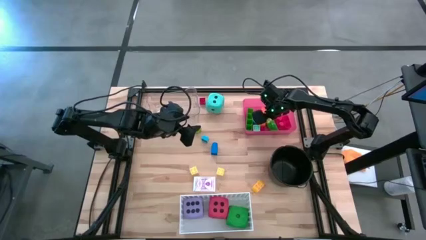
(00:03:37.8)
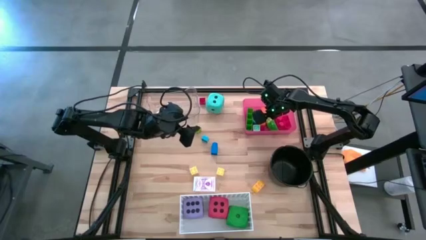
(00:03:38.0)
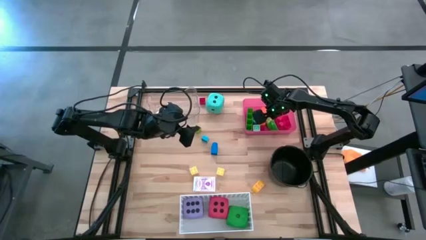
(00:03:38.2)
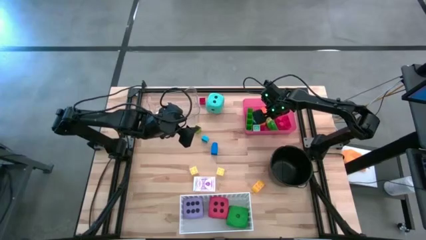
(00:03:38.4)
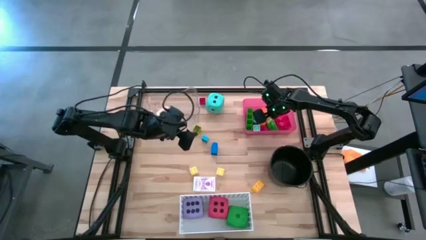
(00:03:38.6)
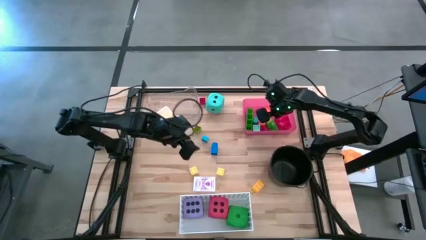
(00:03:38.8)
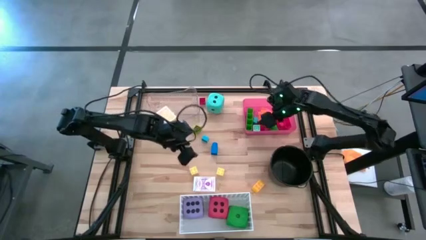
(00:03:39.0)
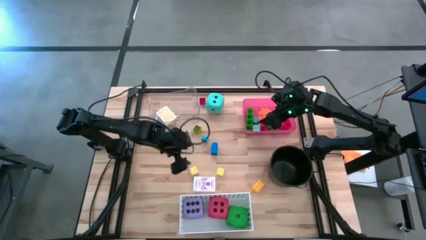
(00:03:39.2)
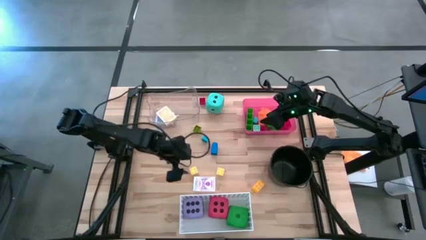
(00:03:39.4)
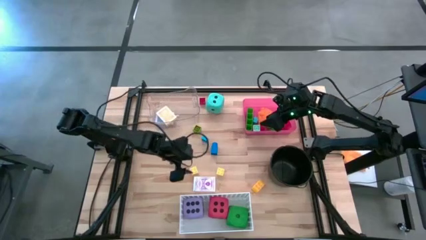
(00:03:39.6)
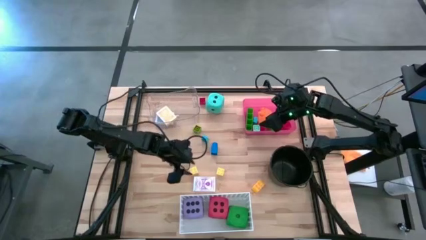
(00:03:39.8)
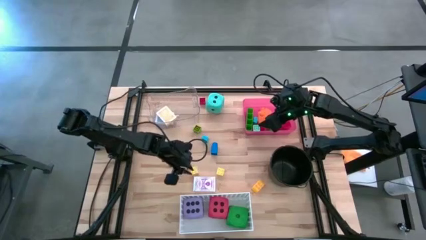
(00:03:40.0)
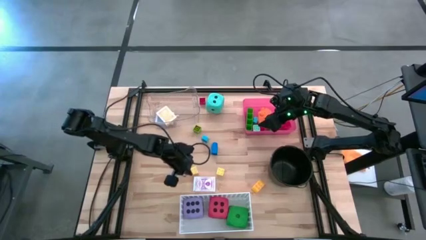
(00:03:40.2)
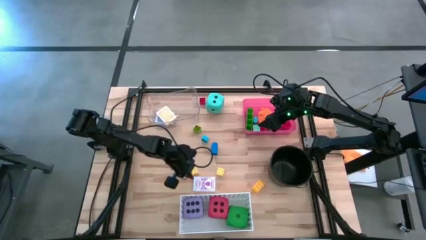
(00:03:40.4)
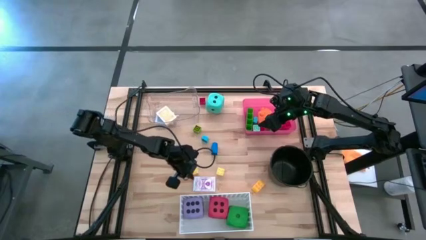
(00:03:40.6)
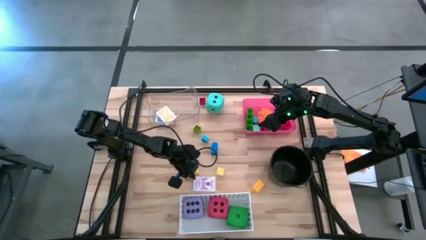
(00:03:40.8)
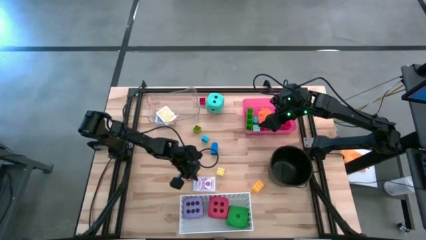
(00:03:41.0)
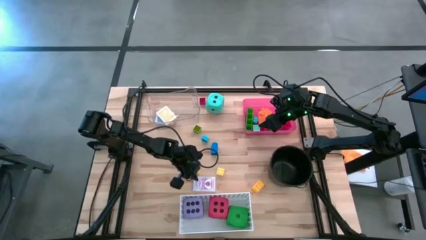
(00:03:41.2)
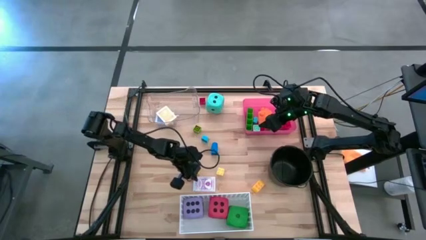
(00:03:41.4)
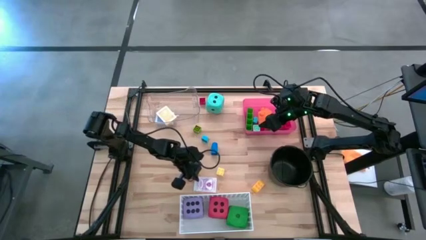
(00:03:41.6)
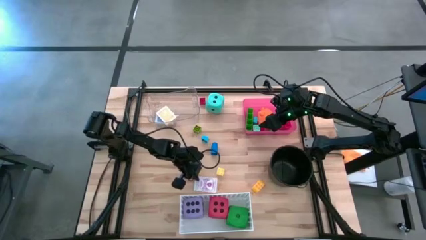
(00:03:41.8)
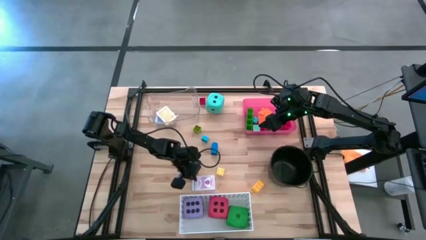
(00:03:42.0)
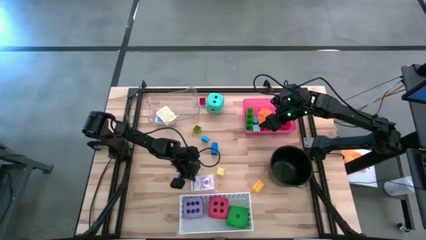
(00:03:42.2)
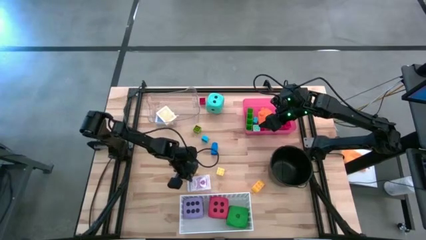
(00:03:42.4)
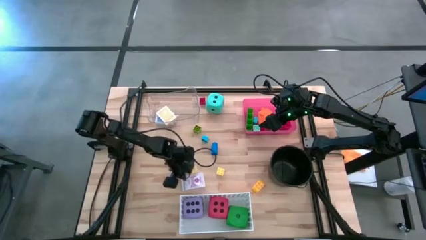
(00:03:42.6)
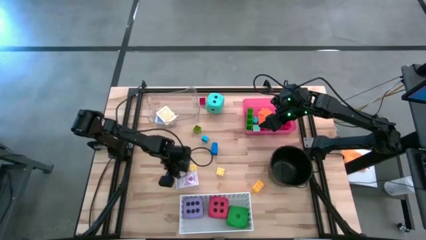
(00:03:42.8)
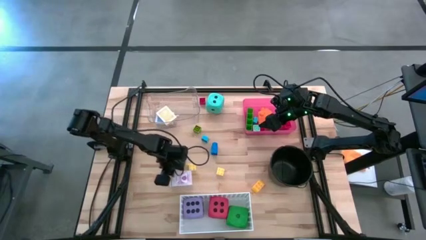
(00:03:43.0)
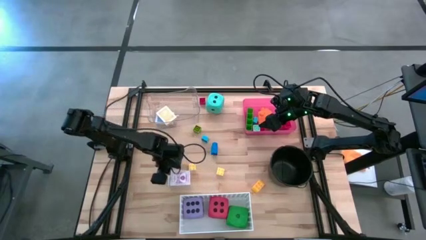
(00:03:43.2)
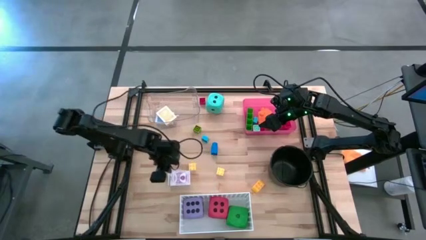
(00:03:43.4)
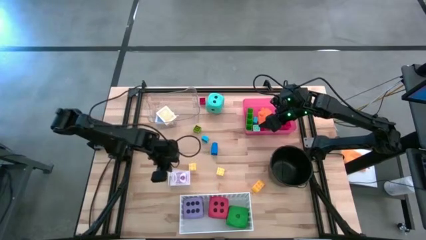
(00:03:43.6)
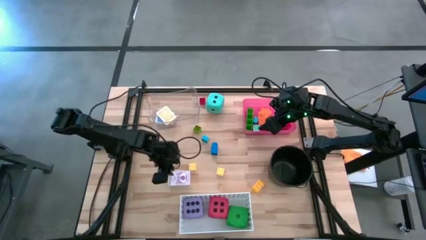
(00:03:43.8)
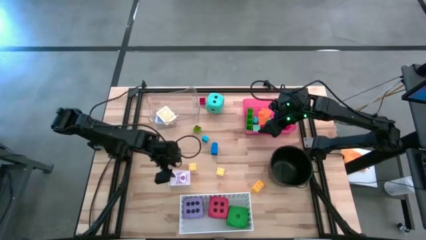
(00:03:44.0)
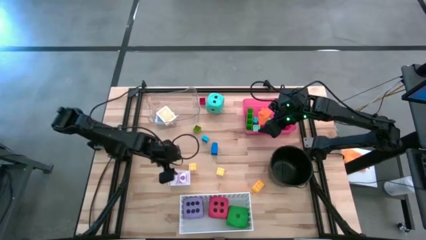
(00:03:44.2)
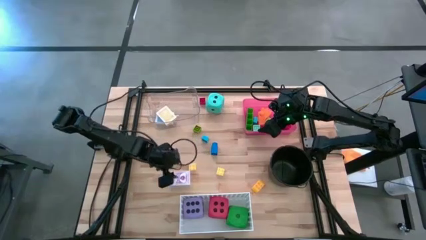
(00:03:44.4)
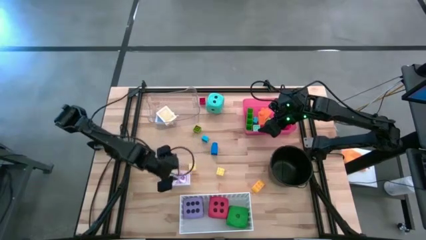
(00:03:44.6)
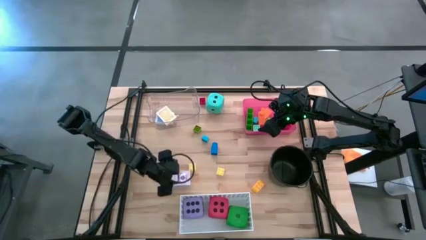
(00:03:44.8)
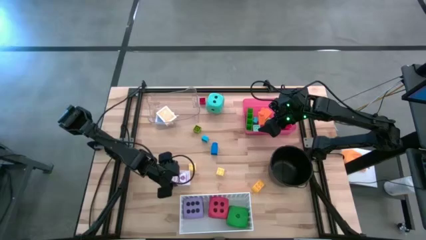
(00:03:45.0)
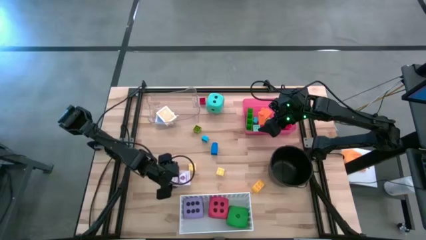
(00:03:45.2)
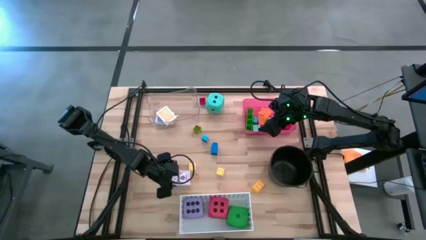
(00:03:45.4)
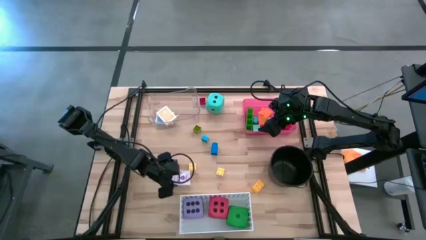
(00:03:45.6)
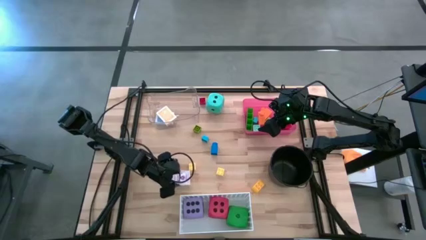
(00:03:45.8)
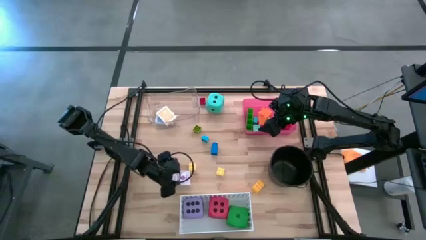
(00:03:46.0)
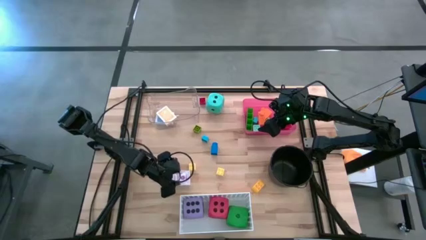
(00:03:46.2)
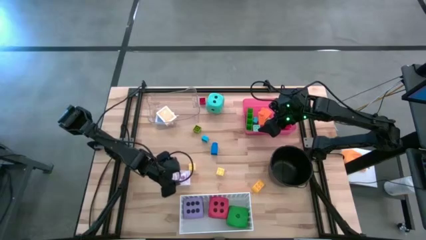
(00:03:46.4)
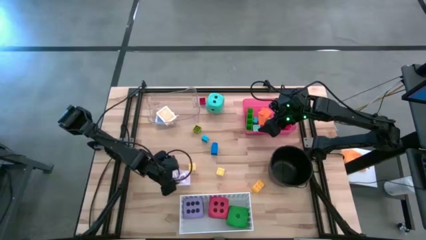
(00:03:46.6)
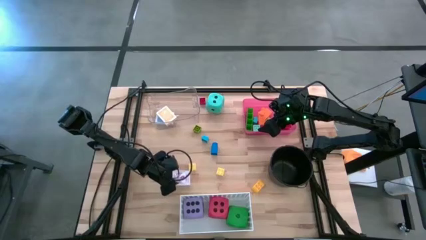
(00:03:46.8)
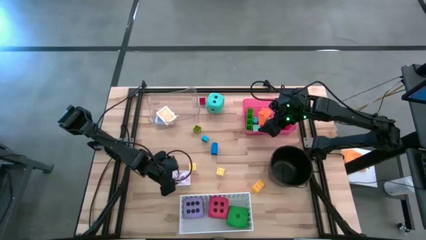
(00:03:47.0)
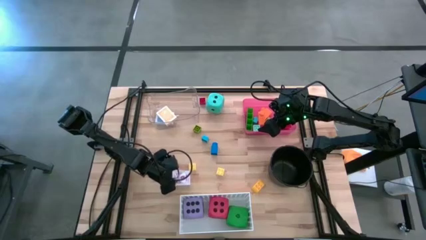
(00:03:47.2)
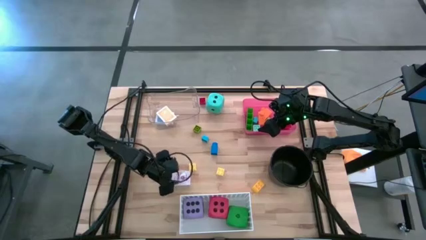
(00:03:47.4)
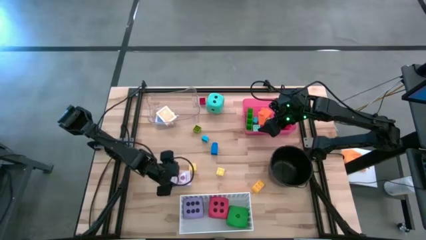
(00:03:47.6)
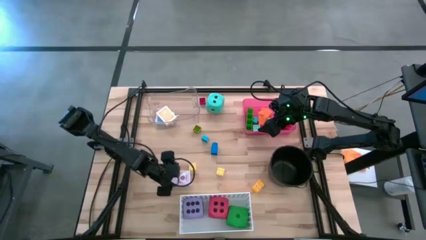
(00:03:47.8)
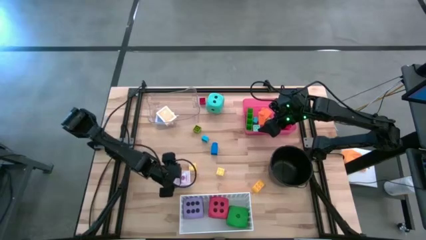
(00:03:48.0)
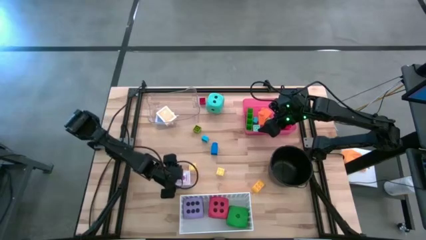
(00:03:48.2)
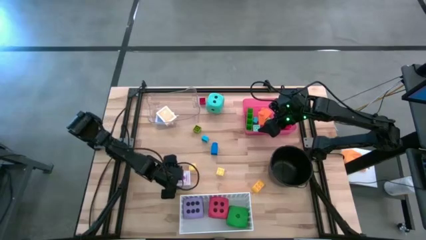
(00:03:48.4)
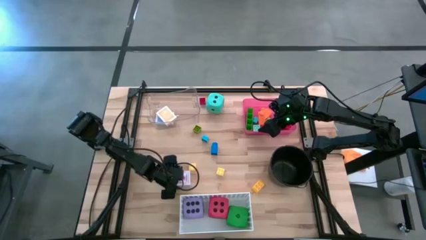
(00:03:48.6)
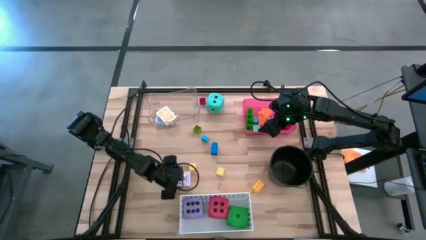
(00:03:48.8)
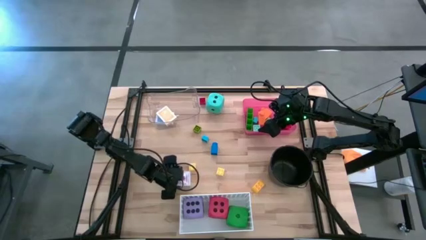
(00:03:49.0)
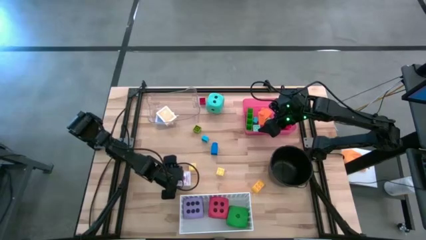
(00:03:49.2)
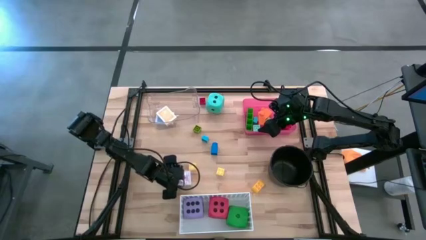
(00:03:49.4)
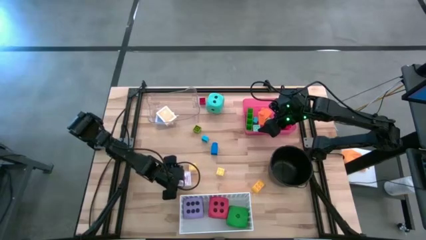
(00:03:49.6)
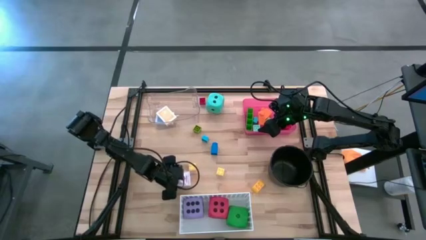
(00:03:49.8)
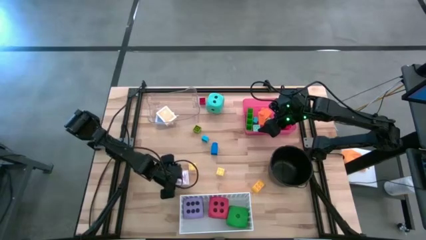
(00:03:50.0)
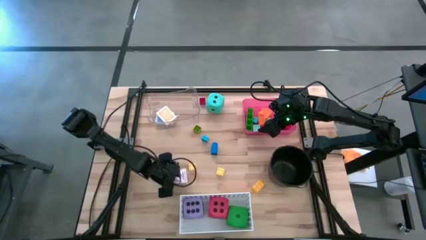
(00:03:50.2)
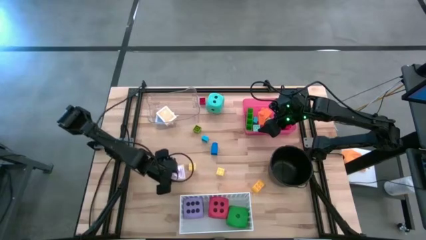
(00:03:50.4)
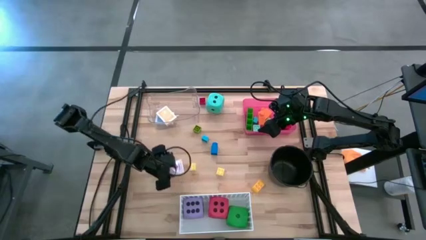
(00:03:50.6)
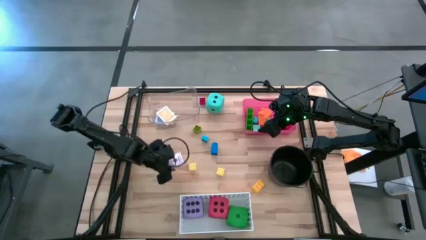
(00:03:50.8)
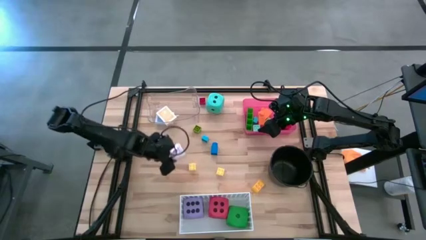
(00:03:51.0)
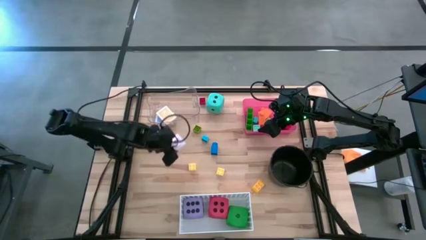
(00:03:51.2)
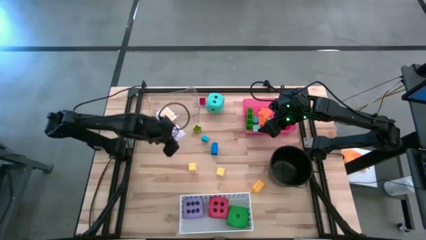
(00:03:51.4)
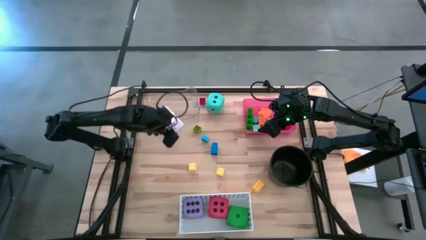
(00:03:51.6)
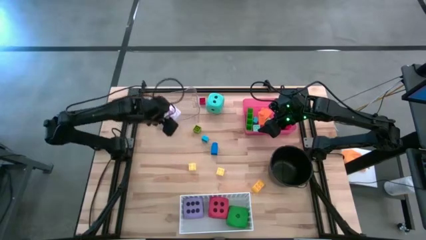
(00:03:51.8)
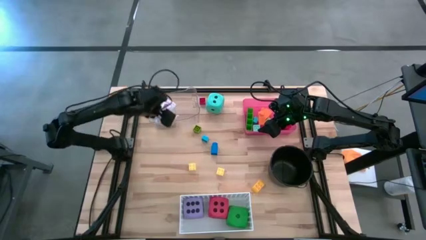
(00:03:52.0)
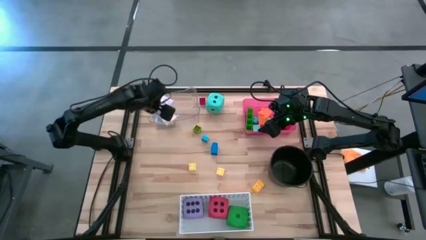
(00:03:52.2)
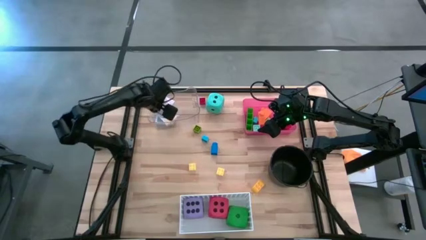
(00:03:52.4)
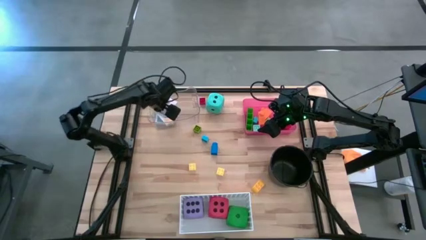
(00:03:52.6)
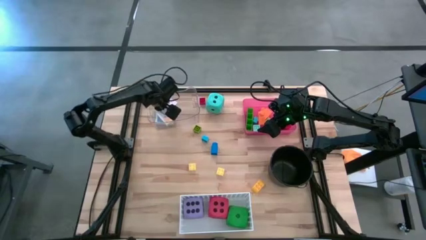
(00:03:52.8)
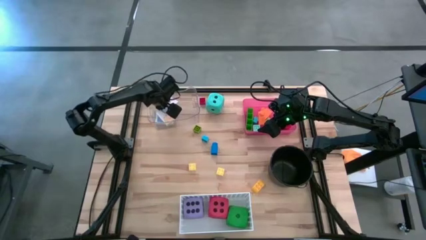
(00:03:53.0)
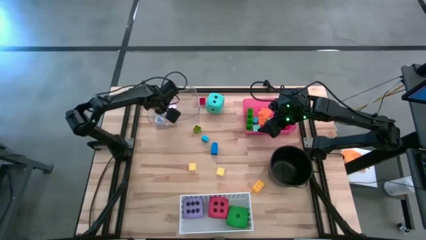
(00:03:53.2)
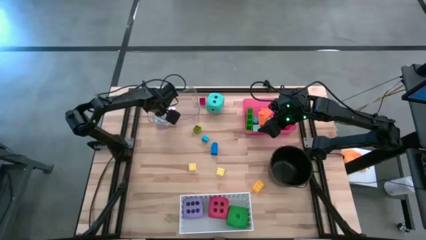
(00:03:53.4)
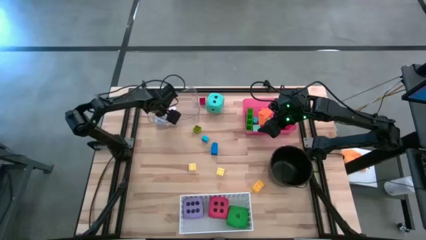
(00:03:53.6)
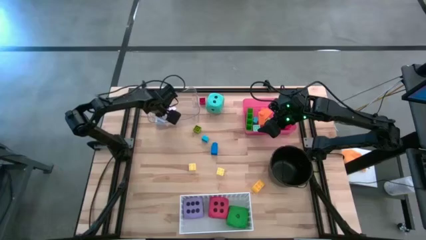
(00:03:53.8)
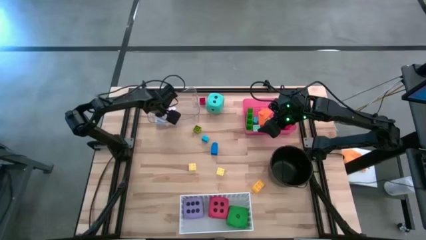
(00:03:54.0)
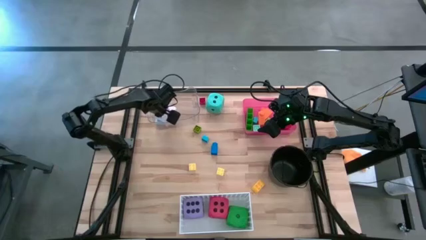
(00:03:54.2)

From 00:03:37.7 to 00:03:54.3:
Task: Pick & Place Toys
Put the purple deck of cards into the transparent bin

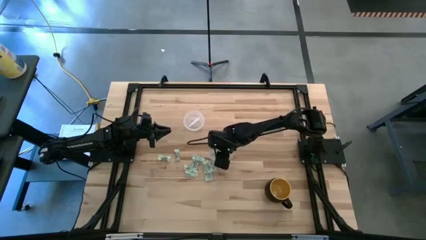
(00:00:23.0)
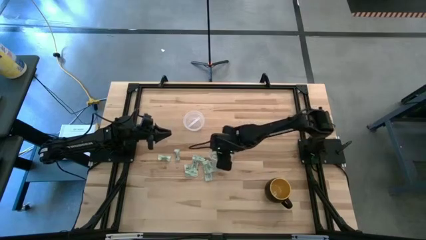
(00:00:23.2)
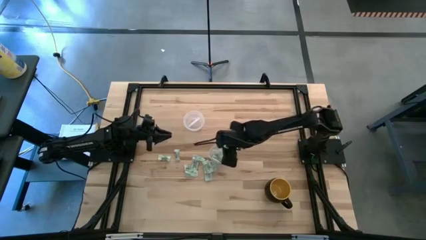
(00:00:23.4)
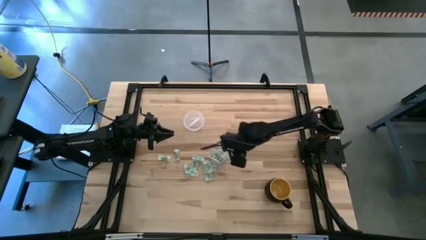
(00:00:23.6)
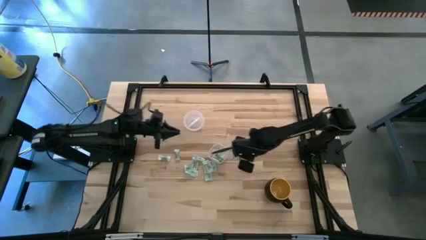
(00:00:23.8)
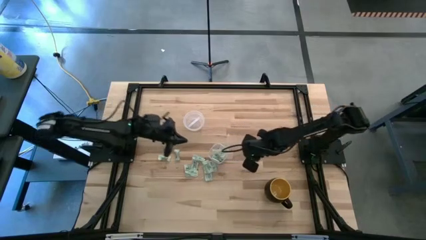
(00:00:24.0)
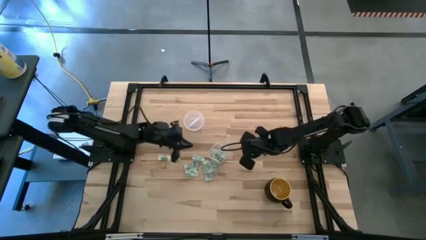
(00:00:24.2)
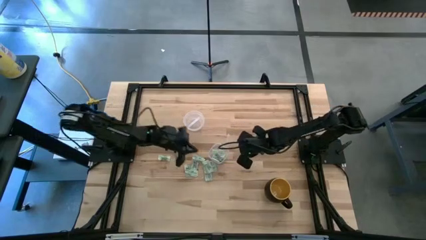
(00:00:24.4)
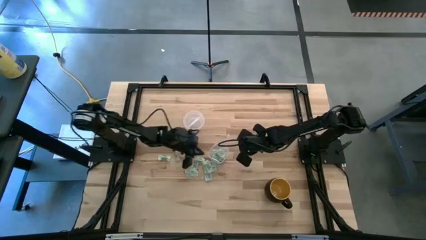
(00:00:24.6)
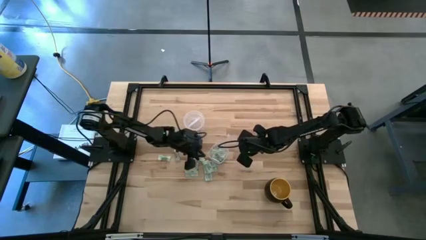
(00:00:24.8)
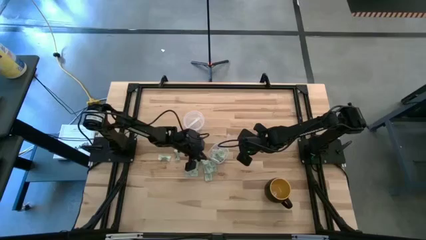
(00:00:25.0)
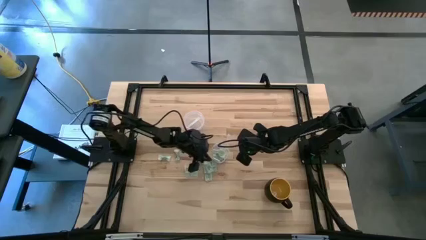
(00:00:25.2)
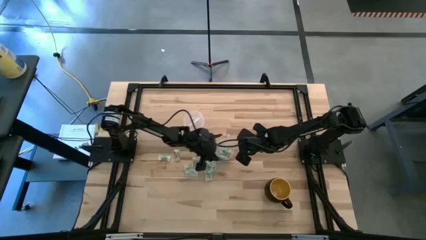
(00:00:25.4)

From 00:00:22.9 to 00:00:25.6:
Task: Pick and place items into bin
Adjust the transparent bin
